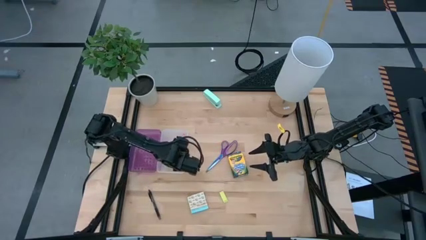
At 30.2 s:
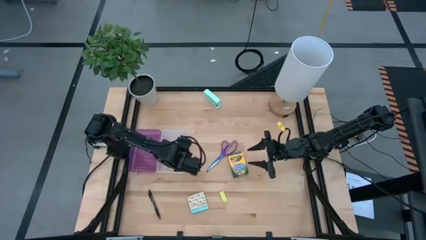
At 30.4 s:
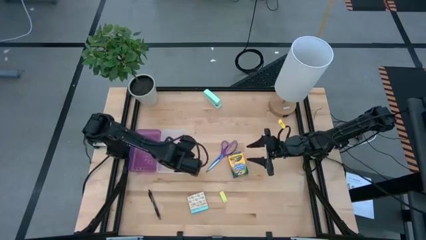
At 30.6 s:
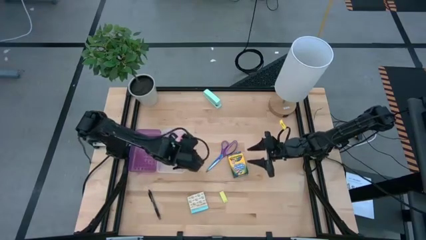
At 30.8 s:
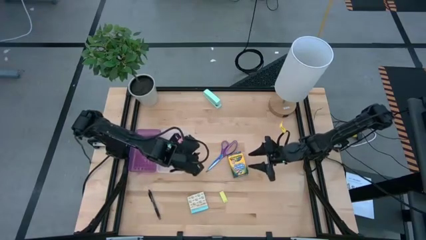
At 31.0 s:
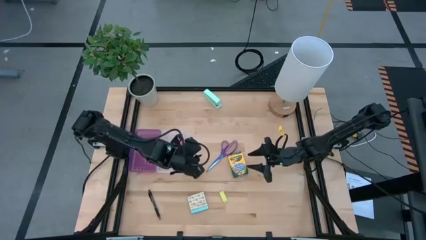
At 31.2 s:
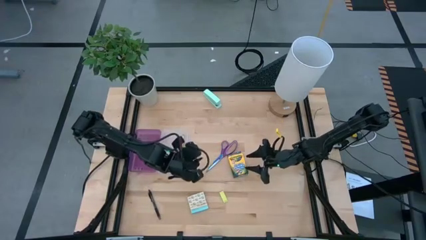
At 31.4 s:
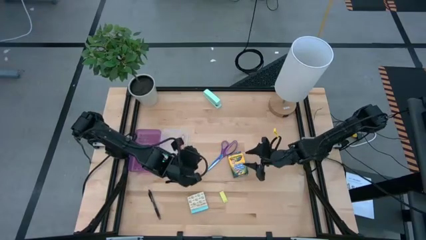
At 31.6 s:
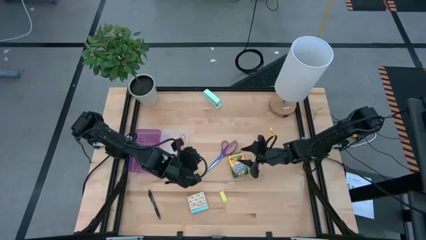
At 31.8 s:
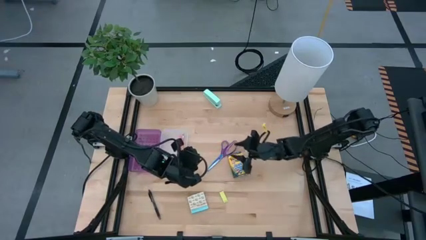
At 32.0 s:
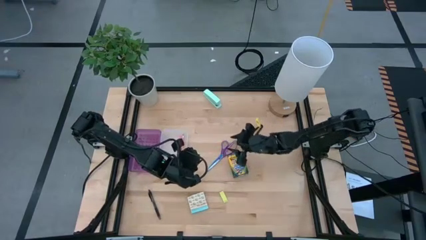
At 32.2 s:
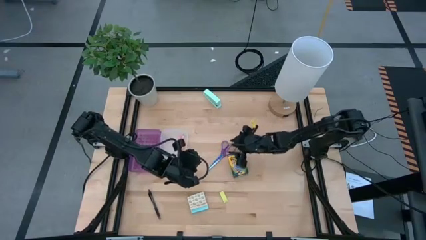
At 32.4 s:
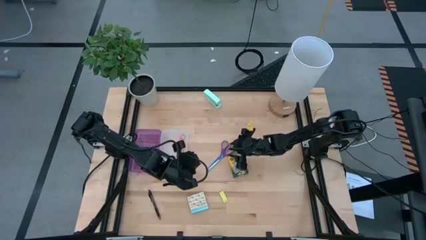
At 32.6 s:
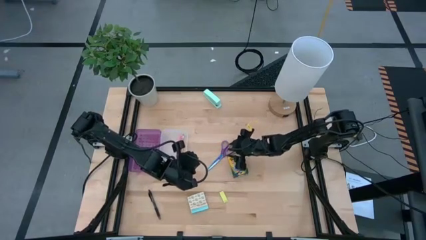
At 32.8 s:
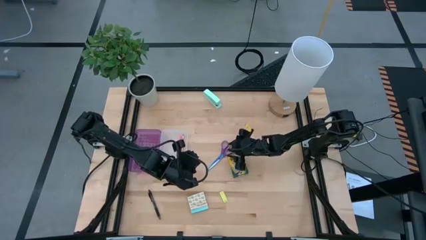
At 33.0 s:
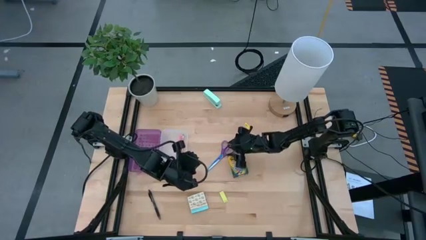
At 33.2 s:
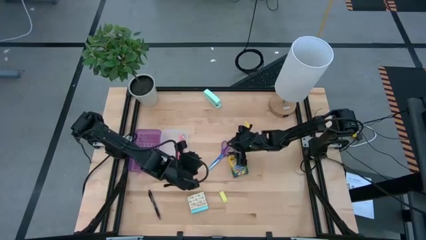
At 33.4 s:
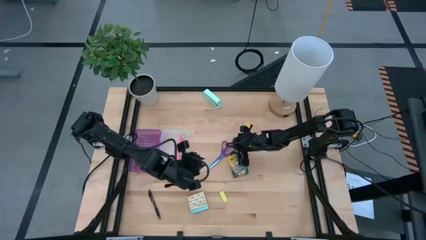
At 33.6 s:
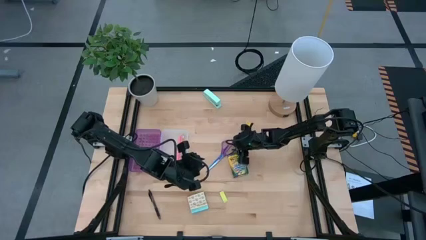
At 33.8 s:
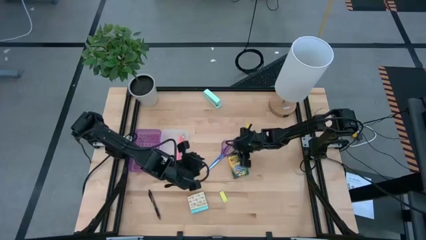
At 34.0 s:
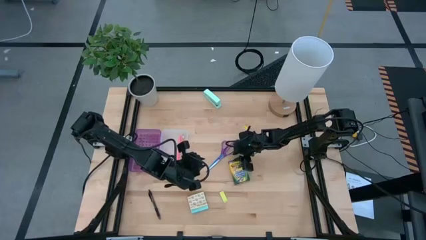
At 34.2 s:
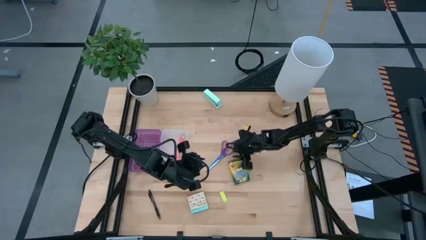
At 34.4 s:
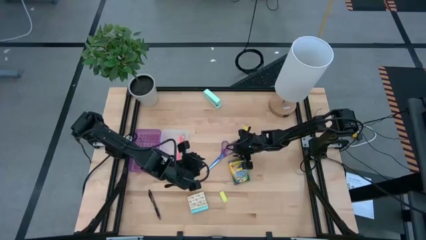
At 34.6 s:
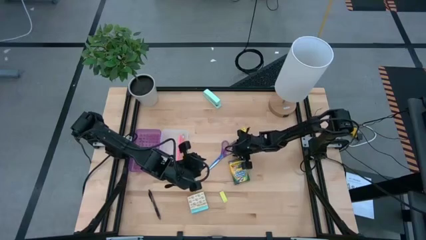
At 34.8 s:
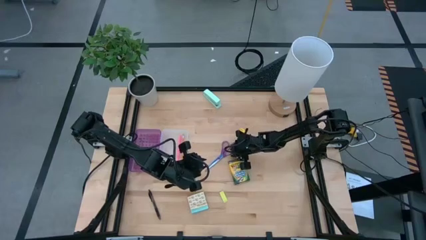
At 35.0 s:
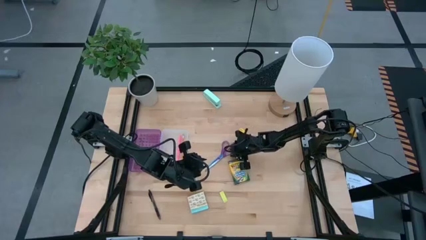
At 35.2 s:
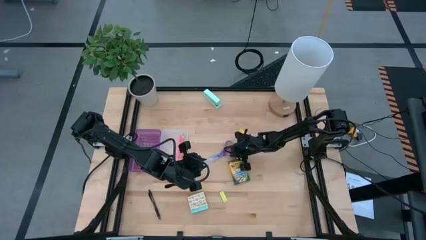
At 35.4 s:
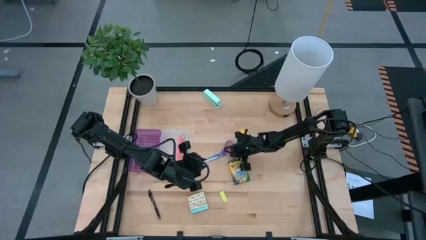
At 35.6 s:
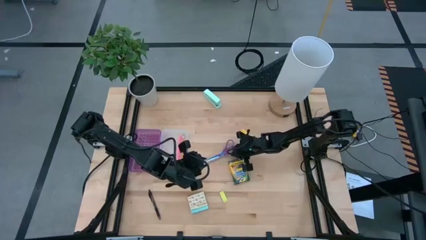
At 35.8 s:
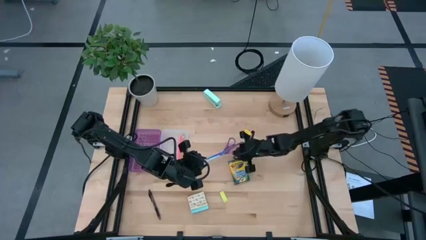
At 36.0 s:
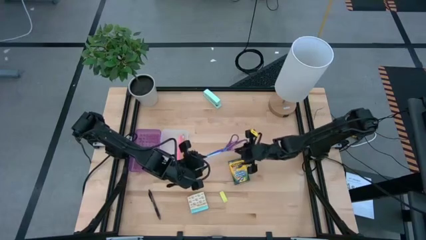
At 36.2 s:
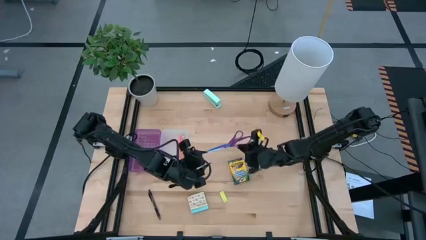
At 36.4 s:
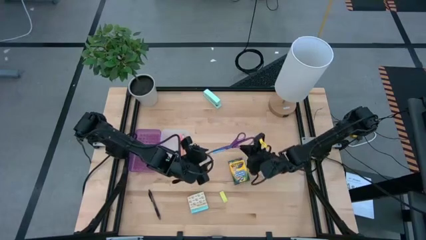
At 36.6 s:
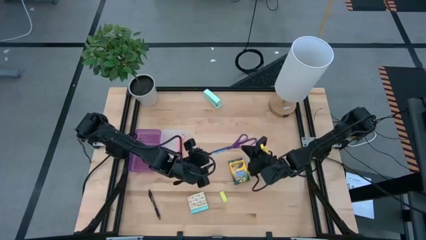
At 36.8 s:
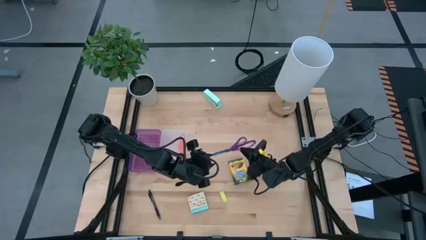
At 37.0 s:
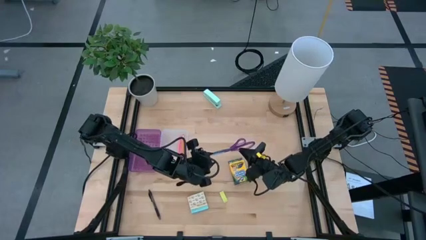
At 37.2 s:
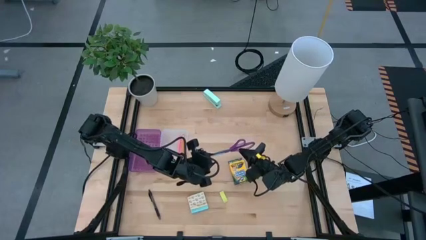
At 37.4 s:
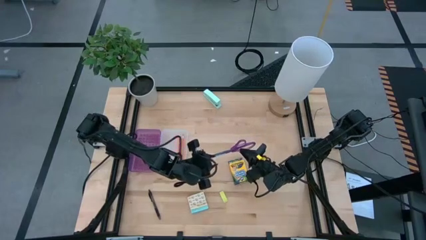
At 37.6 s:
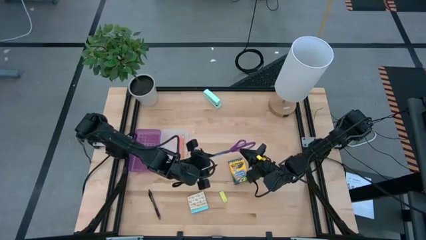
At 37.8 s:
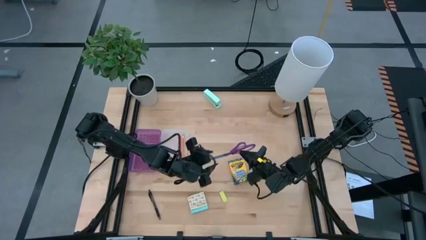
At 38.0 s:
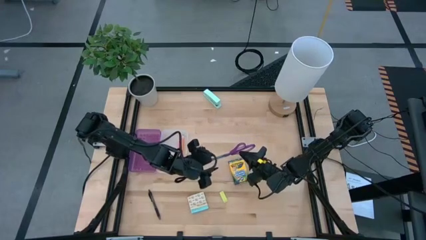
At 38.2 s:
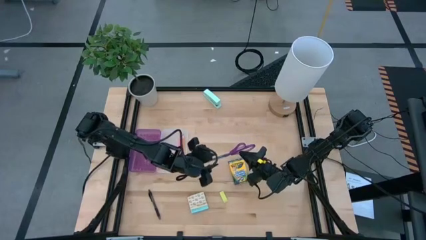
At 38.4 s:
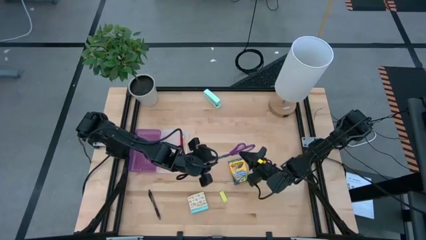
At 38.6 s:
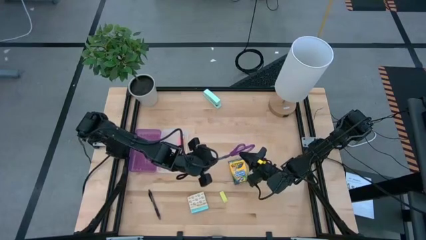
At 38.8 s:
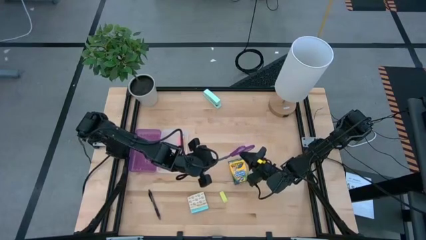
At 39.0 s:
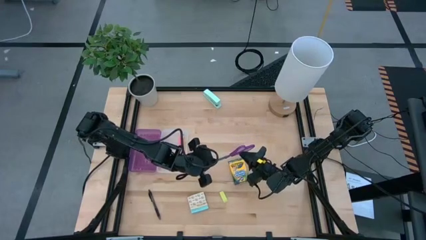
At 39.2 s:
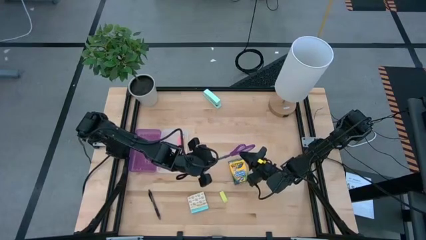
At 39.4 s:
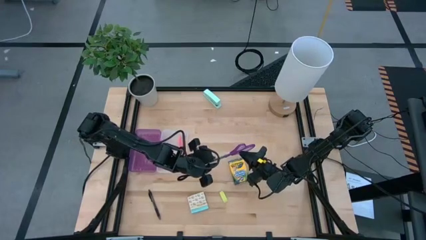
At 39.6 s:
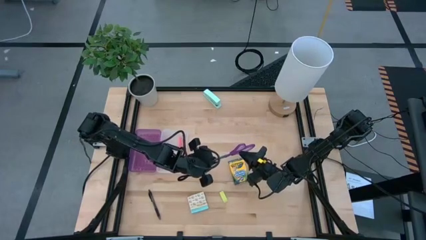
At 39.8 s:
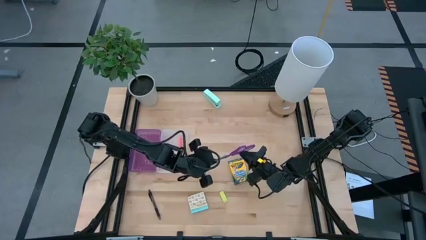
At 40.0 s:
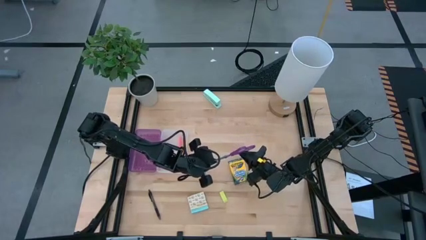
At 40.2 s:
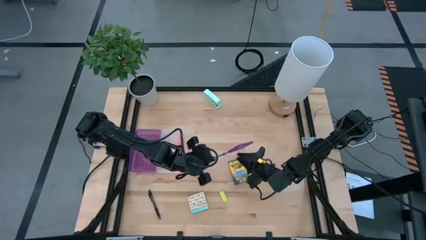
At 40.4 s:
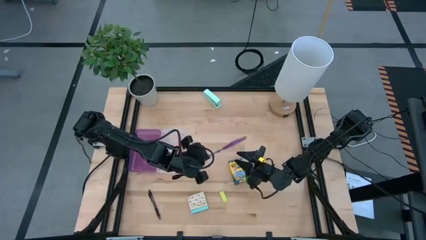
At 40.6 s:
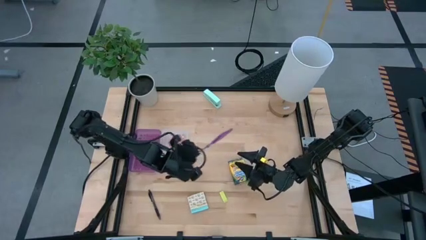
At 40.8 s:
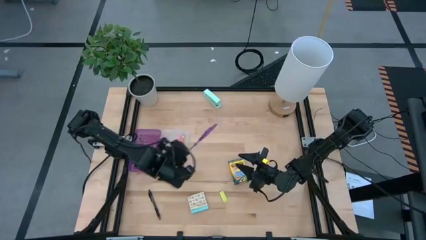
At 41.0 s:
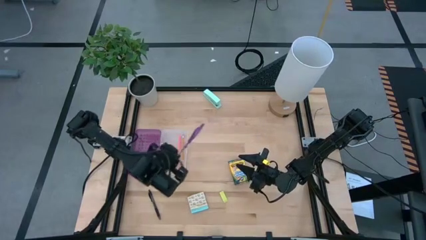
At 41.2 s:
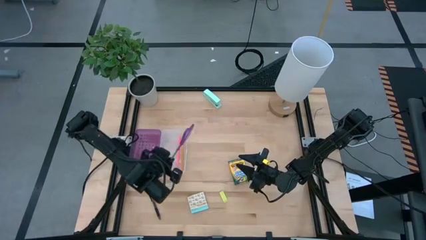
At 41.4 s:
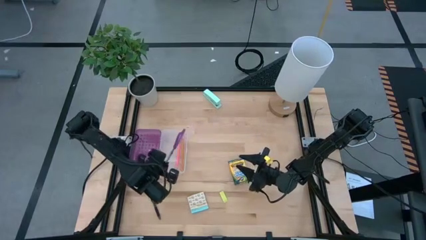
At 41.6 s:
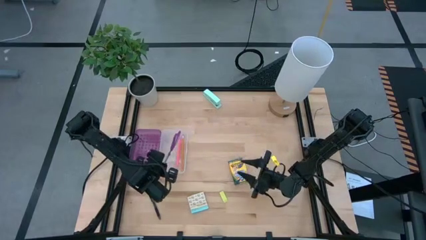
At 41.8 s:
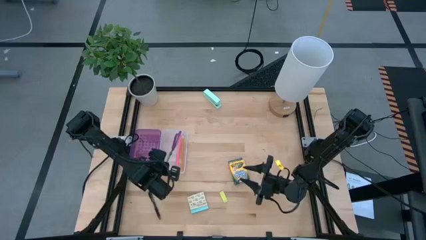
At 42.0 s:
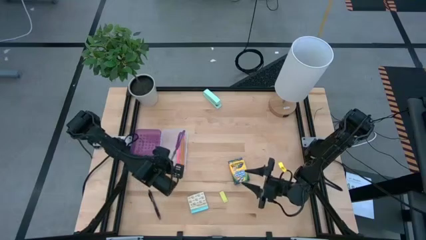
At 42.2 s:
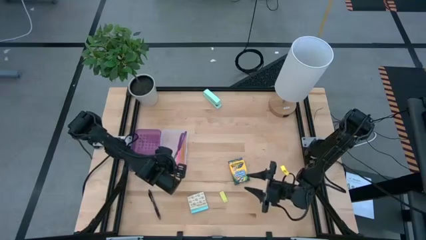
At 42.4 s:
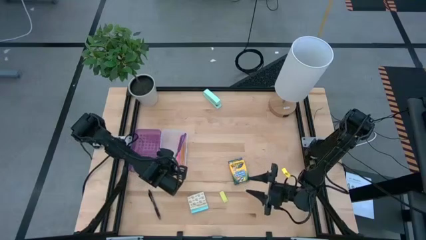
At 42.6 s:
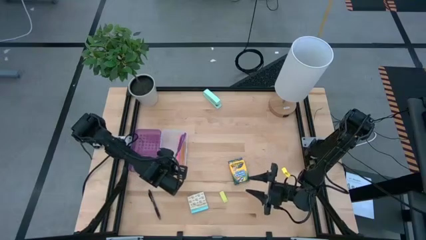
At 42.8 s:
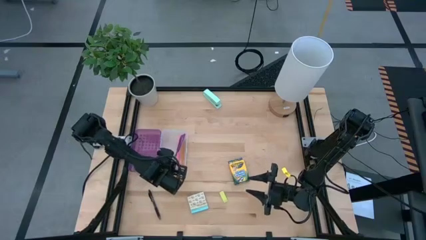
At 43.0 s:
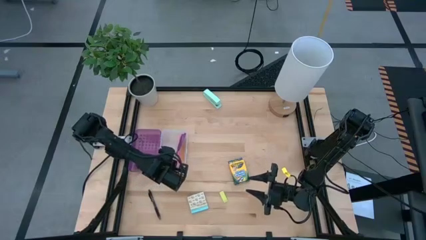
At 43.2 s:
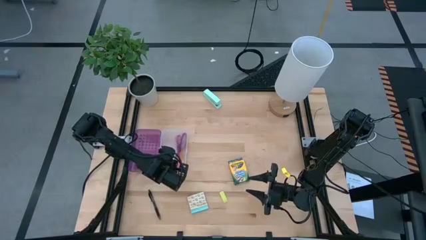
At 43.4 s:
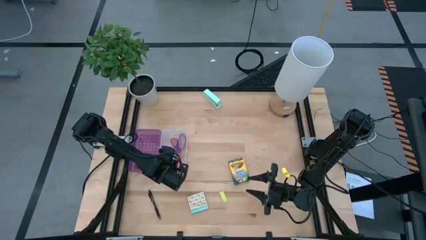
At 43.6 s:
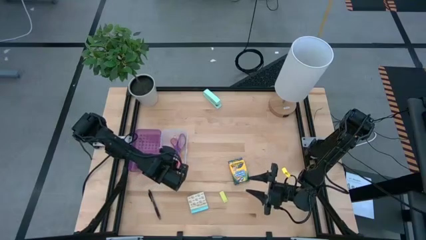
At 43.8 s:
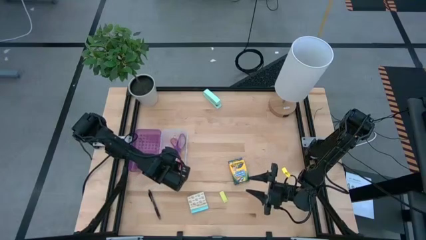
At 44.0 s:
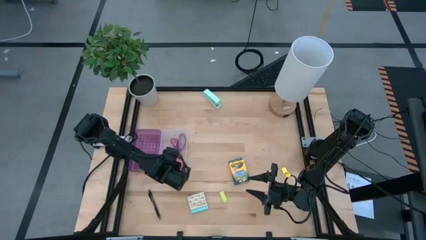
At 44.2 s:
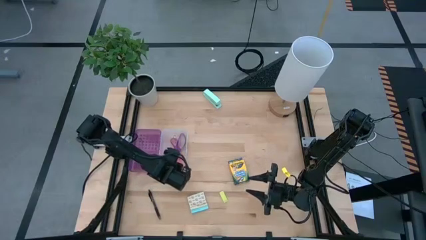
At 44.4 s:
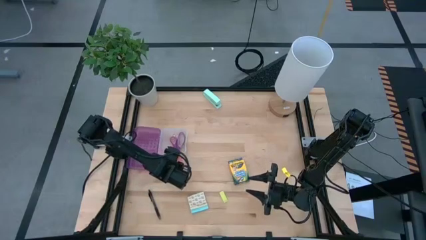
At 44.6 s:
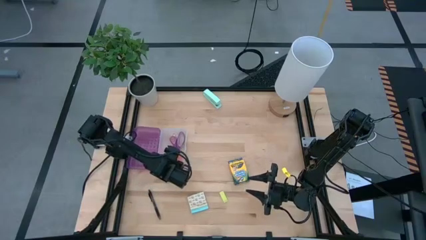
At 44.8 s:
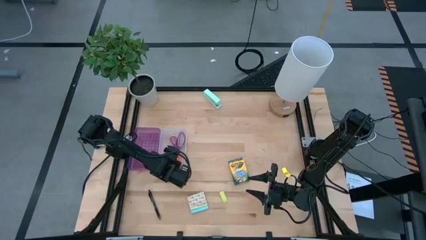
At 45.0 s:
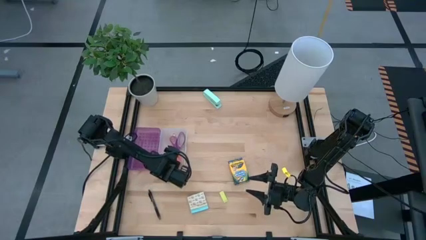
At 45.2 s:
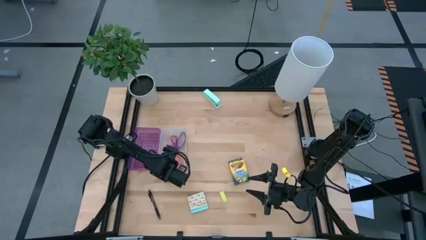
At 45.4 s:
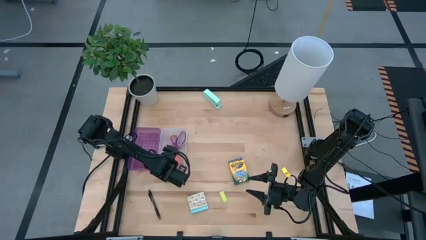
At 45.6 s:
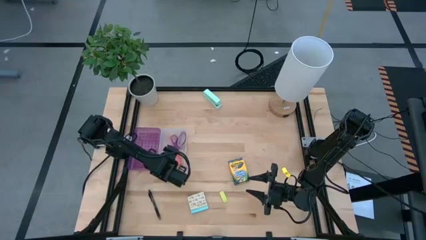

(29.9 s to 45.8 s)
Task: Pack school essentials
Put the violet scissor into the purple supply box
